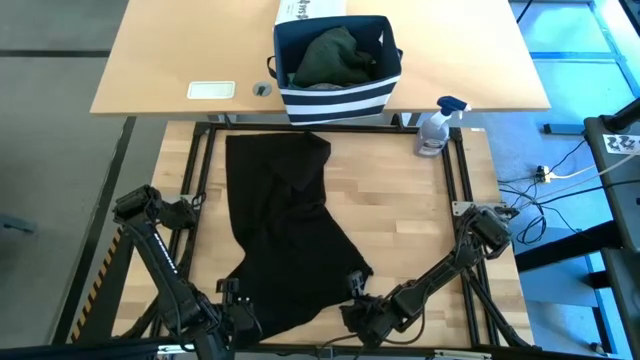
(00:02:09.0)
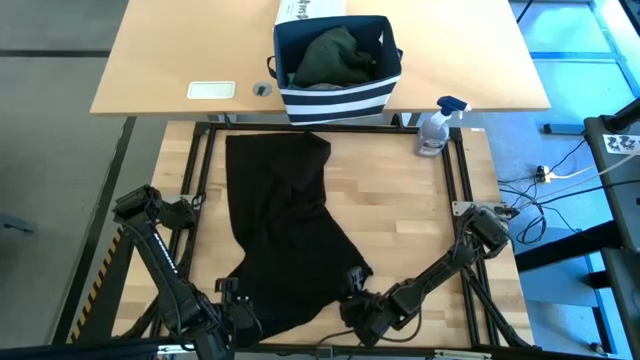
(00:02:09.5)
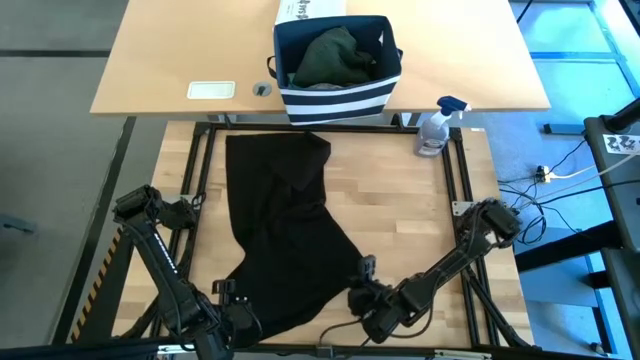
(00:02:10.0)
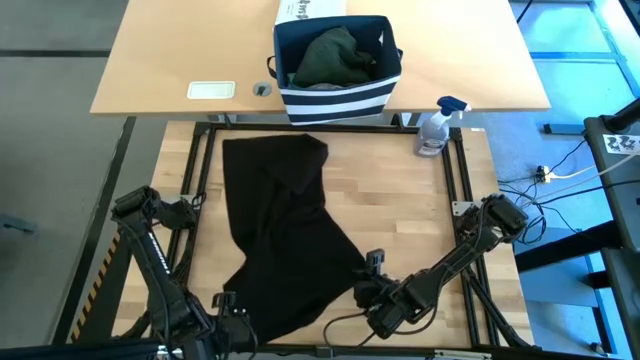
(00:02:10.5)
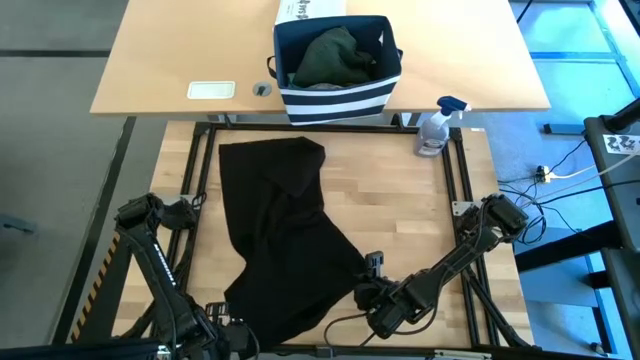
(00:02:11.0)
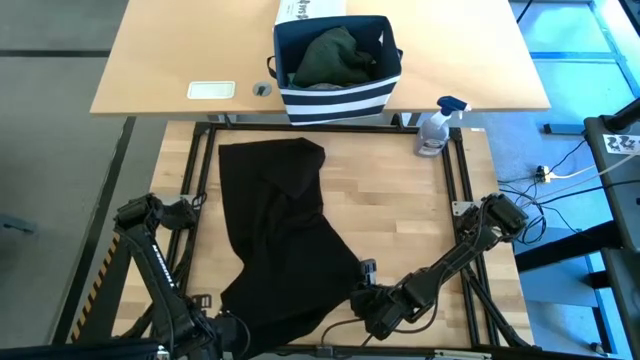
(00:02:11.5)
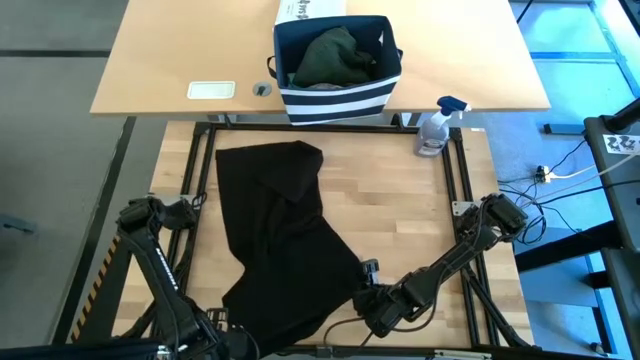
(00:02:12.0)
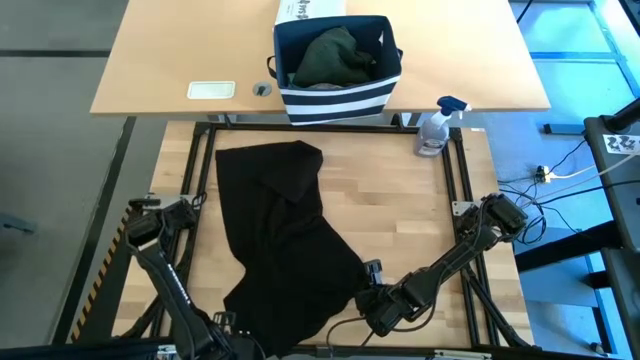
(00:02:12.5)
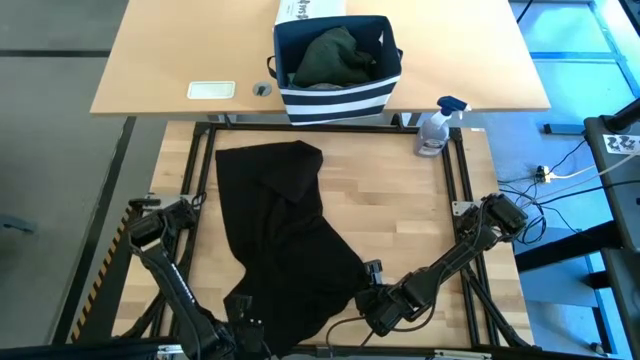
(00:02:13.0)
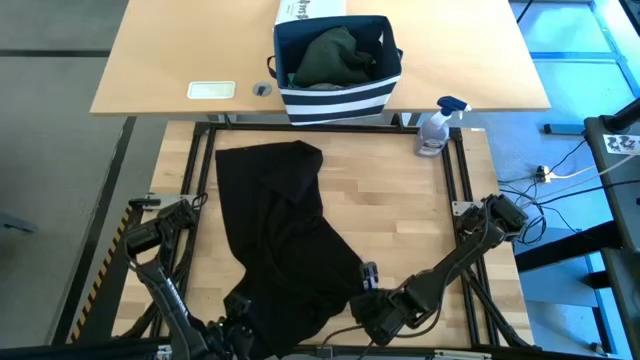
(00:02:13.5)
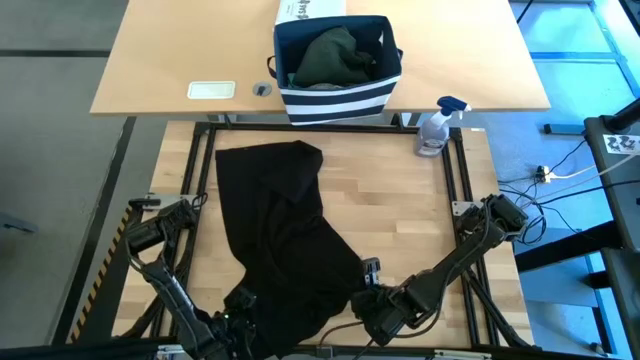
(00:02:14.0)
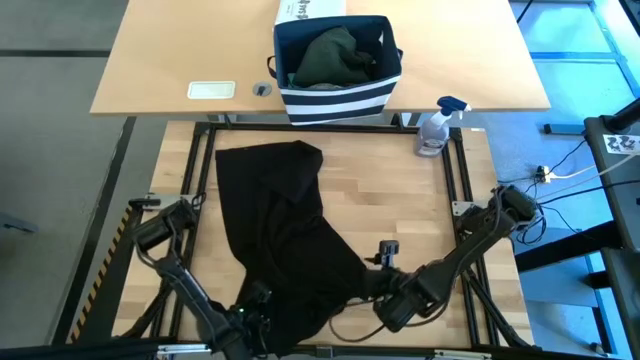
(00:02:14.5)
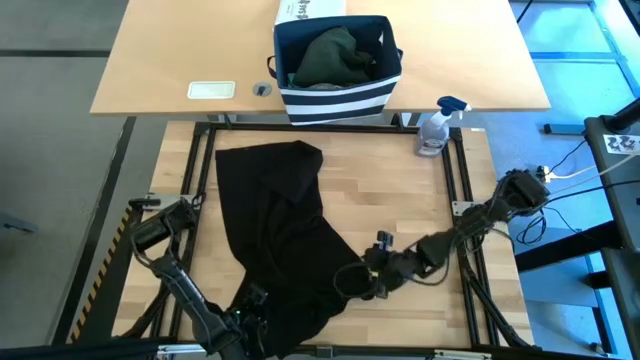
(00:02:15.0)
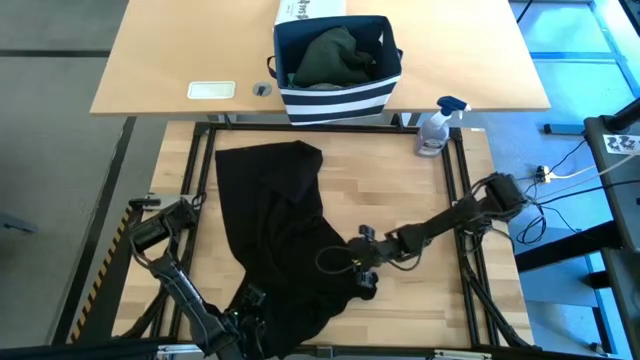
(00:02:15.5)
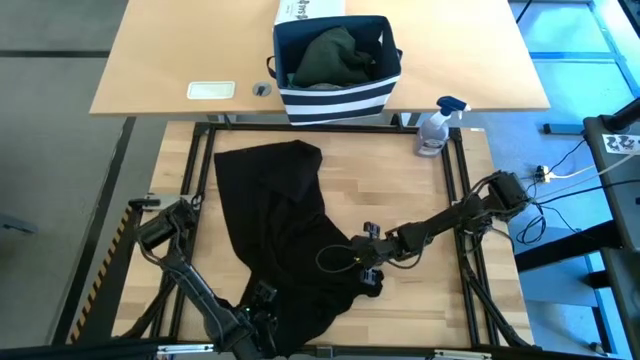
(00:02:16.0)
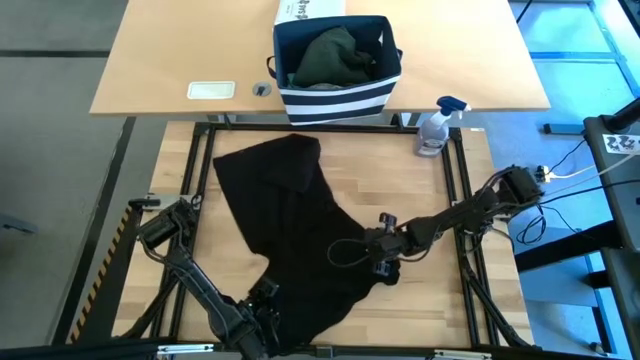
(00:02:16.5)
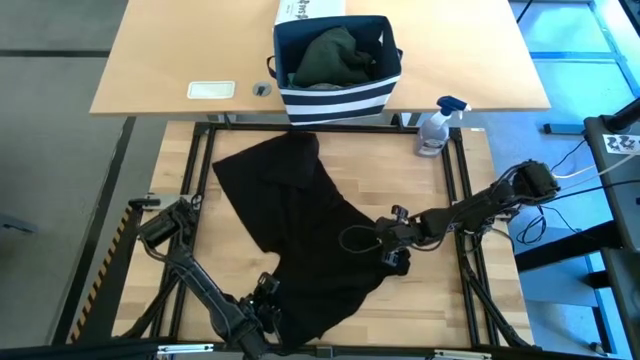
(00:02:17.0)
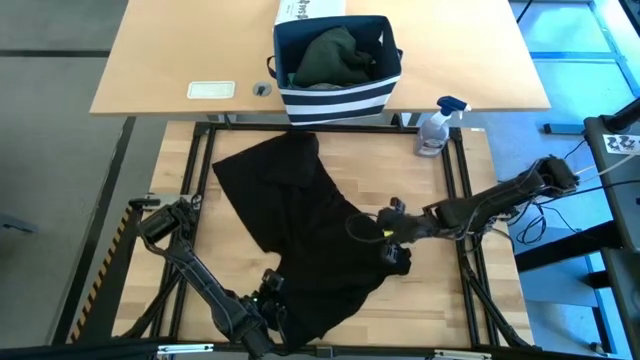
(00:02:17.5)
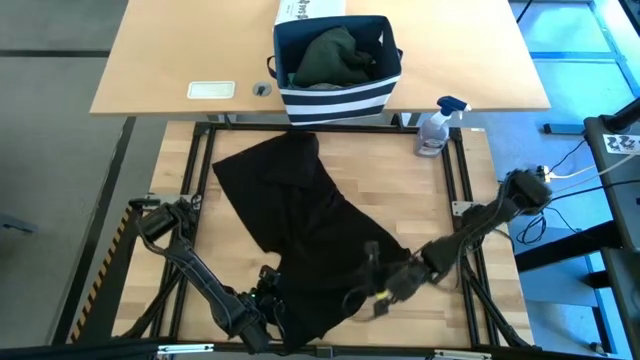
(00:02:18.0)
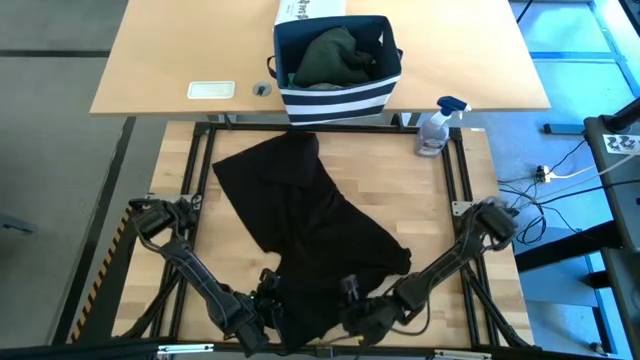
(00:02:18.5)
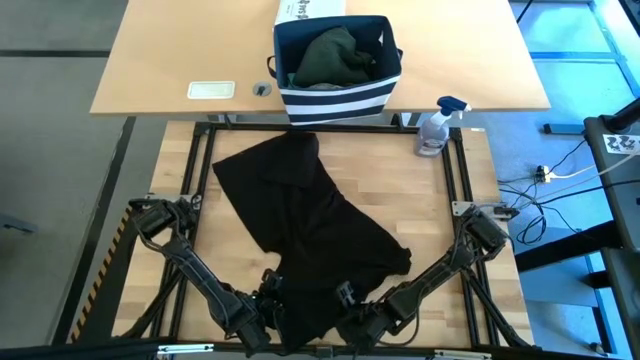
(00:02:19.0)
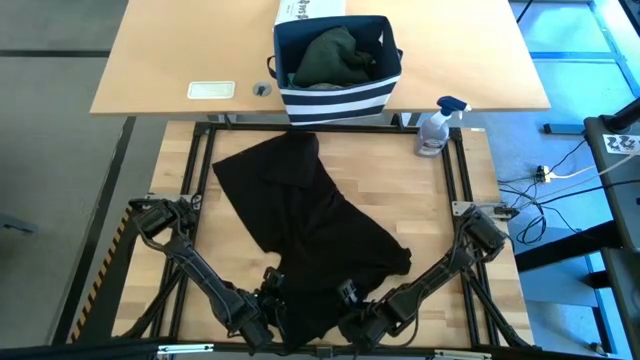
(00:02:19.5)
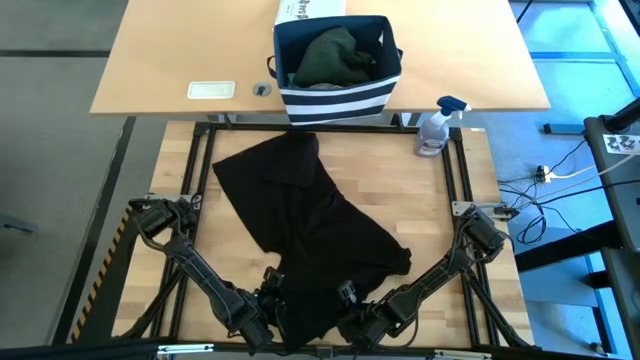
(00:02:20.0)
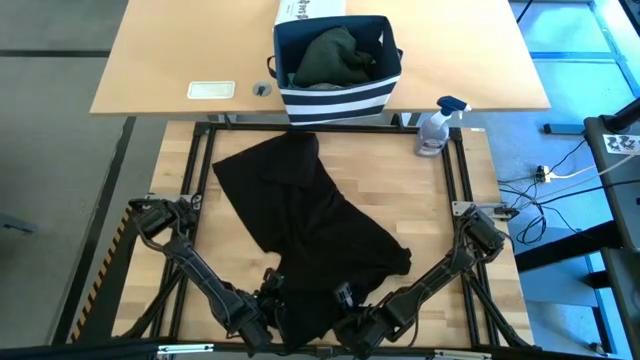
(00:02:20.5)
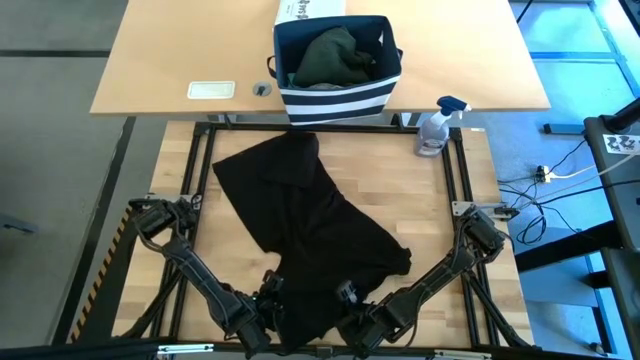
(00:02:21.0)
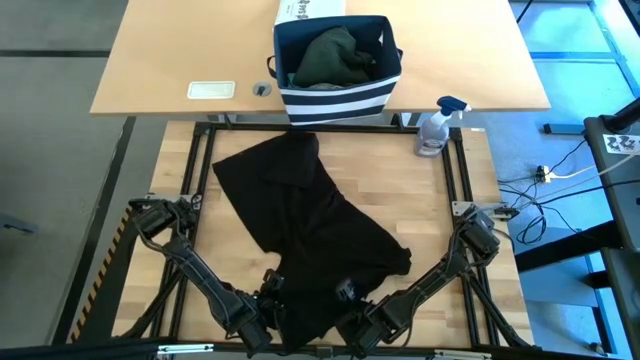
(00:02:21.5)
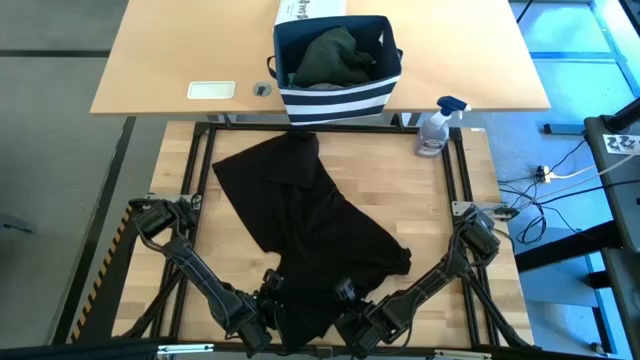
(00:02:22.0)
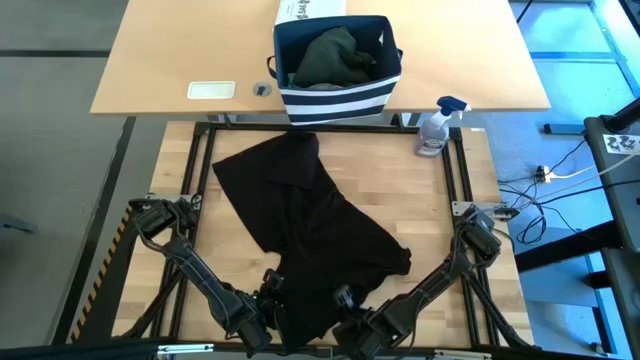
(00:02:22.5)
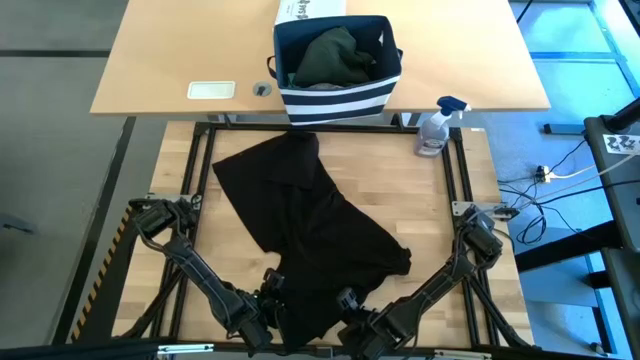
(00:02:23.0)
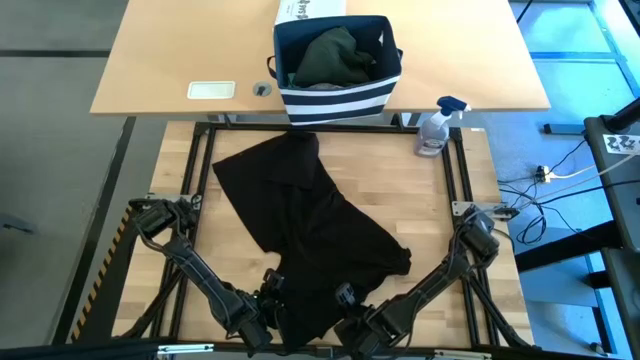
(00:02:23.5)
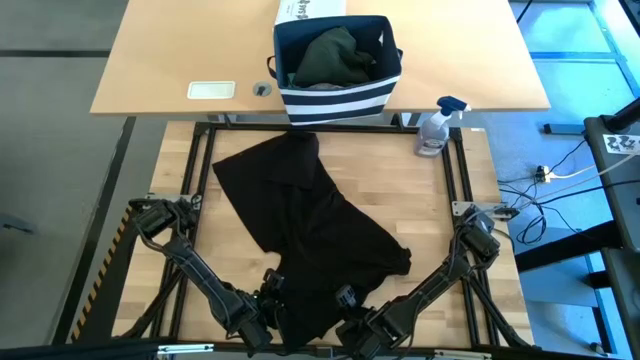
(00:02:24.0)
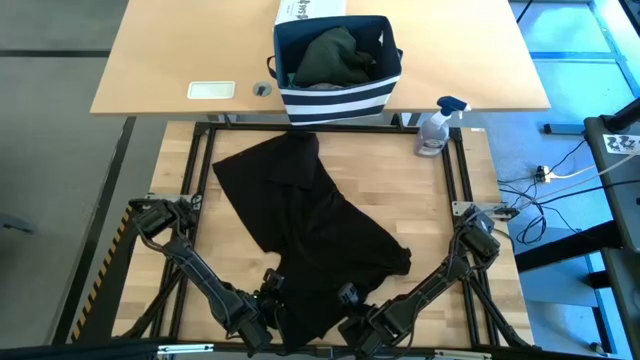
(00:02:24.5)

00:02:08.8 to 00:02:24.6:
Task: Fold Laundry from Bin
Fold the black shirt

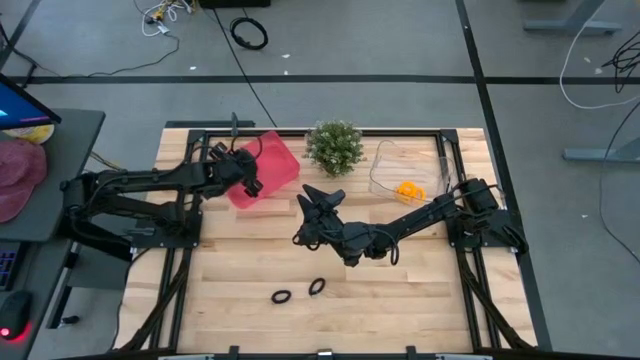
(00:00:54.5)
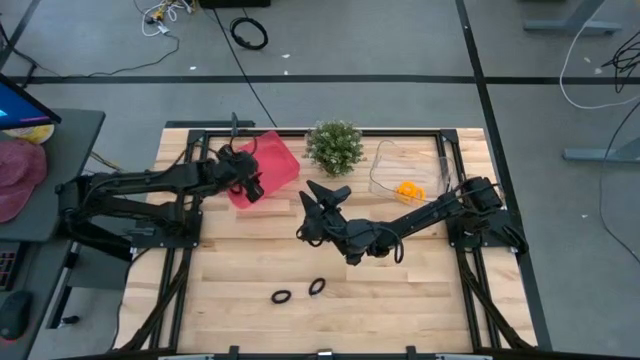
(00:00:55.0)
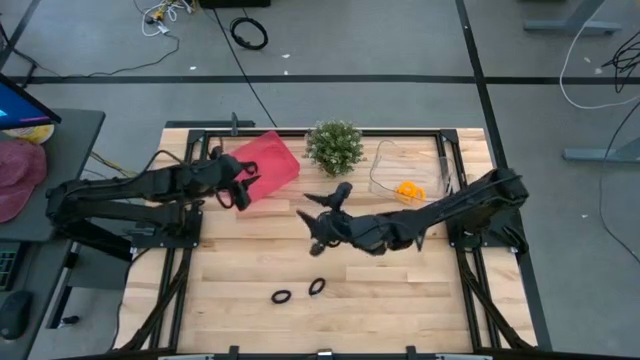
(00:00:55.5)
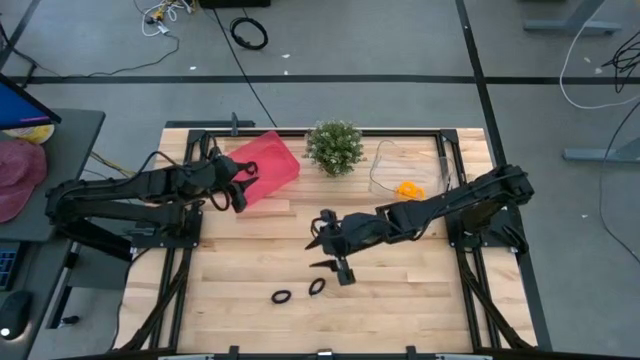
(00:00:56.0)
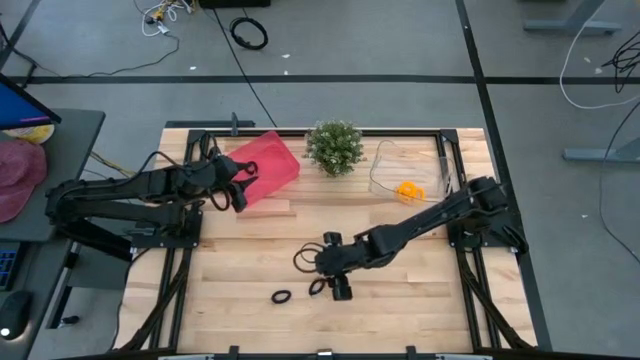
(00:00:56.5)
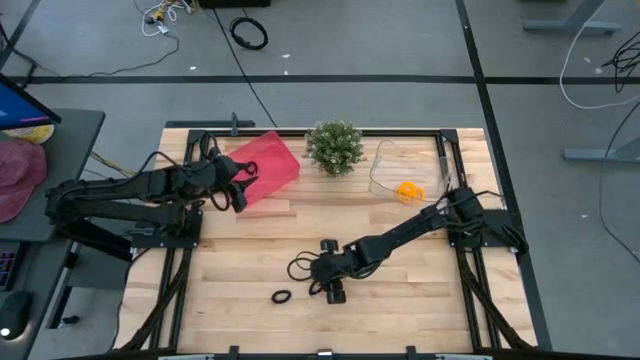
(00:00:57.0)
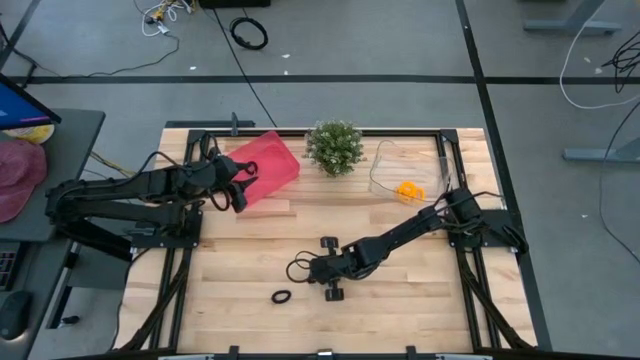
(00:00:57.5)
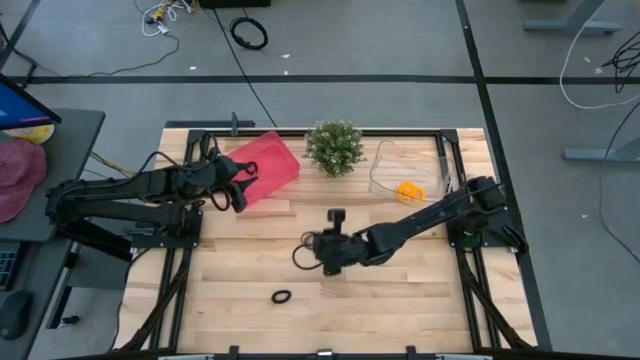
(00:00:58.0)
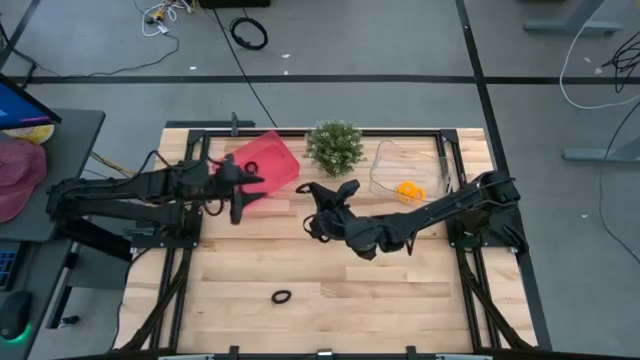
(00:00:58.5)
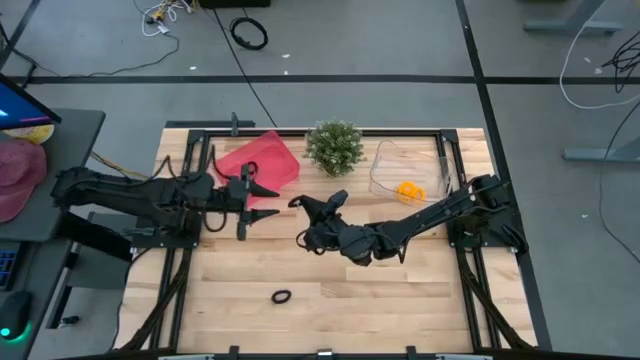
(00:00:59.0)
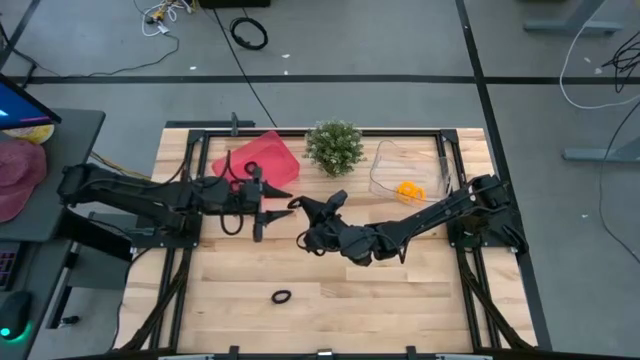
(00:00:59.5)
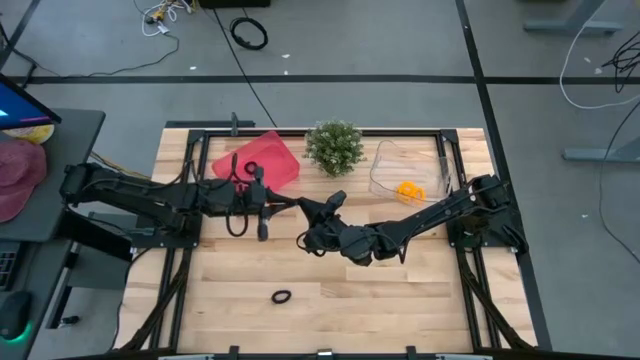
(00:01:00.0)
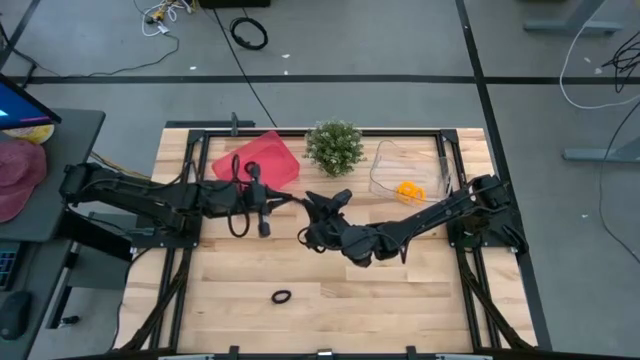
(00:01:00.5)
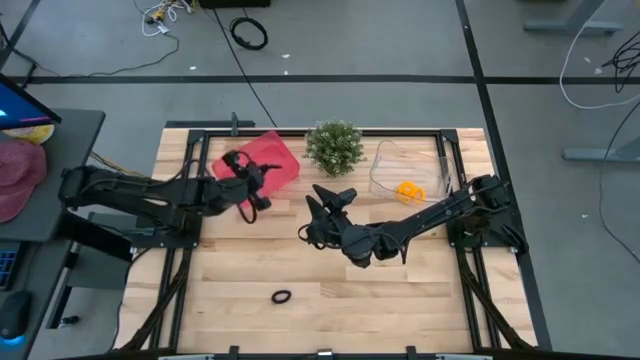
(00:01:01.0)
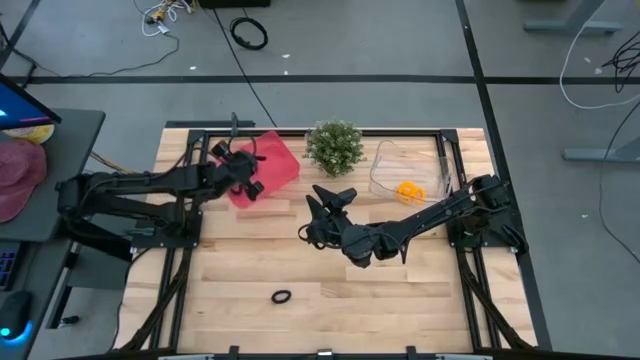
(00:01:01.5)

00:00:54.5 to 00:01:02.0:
Task: Sort spring keychains
Put the right black spring keychain into the red bin
